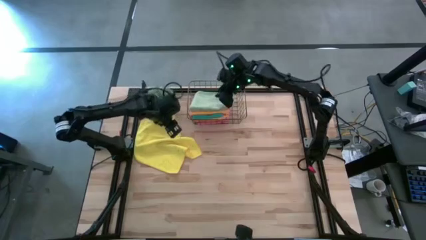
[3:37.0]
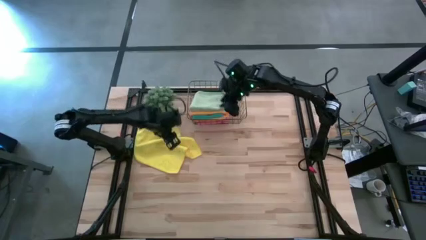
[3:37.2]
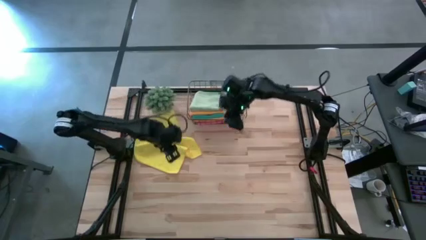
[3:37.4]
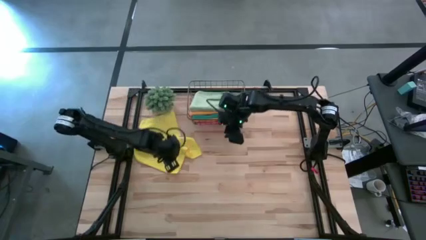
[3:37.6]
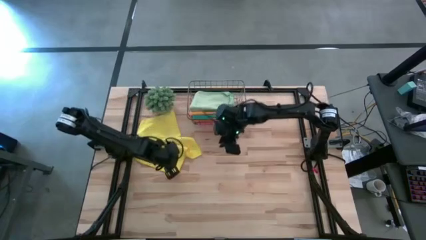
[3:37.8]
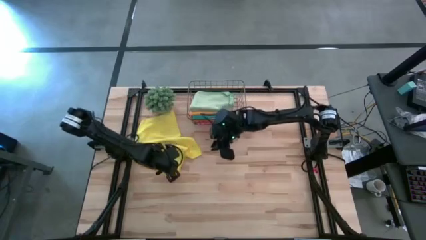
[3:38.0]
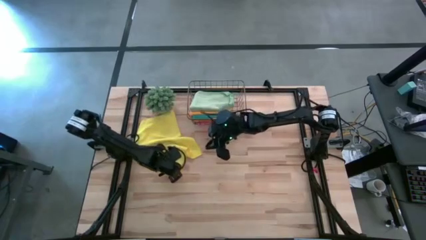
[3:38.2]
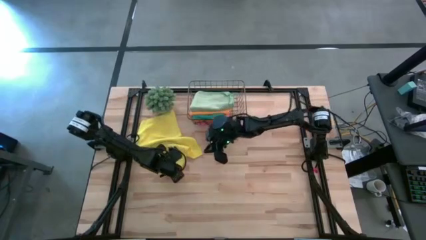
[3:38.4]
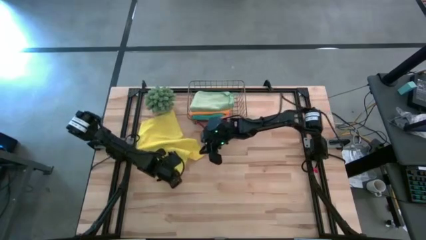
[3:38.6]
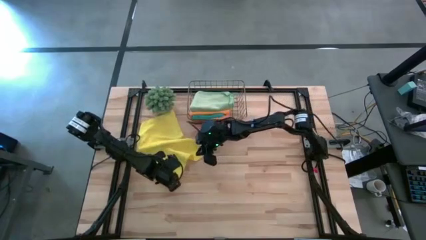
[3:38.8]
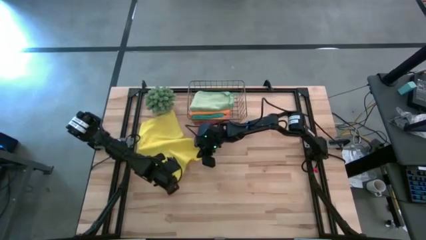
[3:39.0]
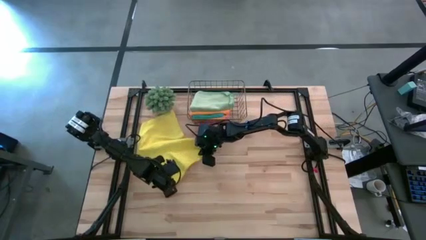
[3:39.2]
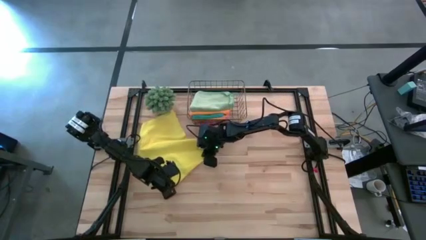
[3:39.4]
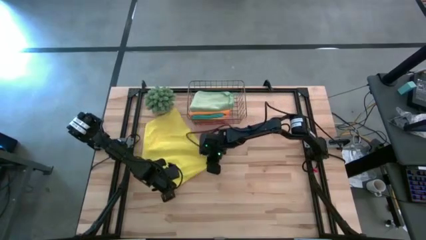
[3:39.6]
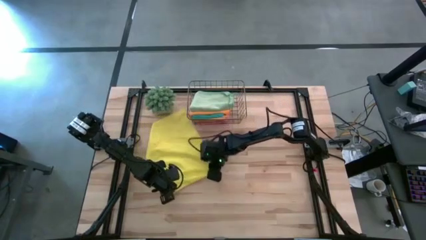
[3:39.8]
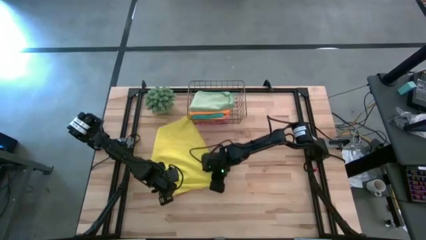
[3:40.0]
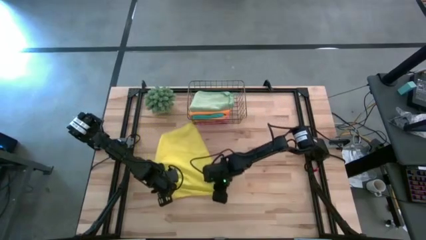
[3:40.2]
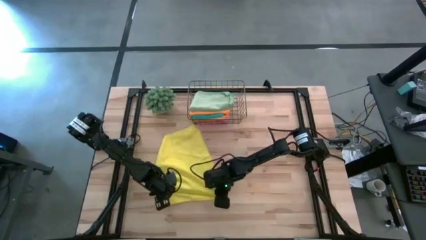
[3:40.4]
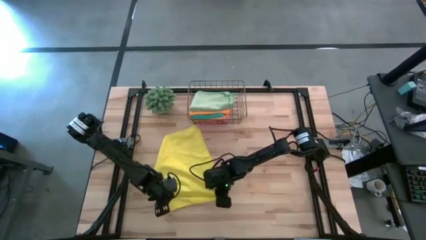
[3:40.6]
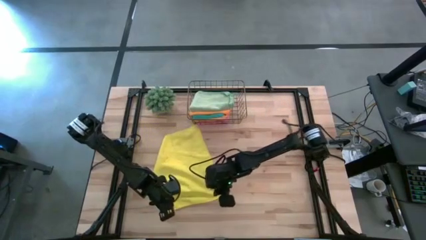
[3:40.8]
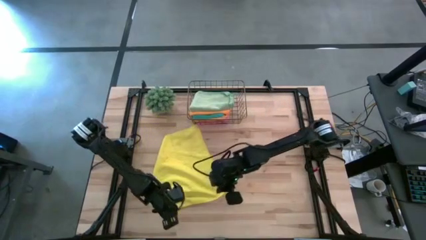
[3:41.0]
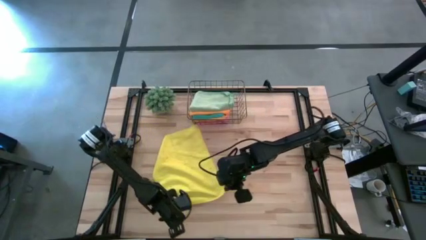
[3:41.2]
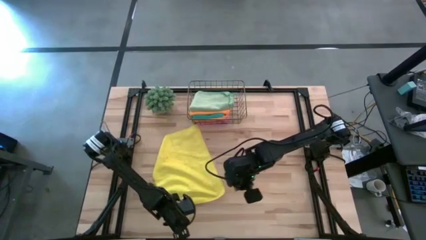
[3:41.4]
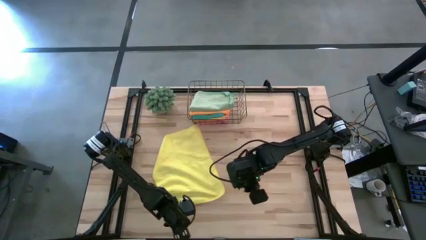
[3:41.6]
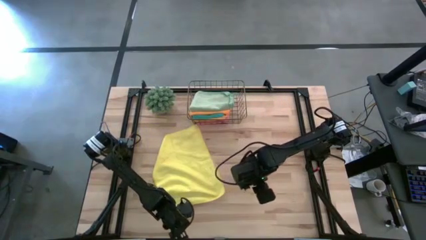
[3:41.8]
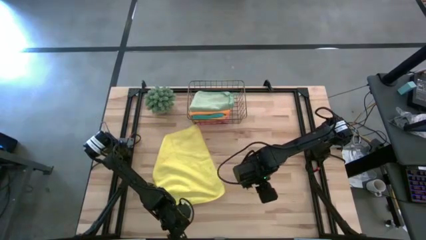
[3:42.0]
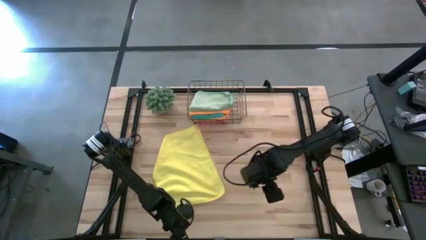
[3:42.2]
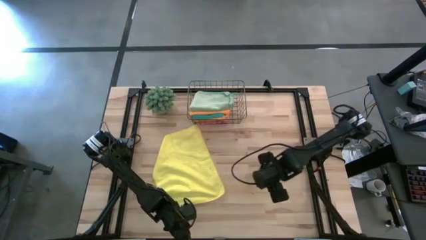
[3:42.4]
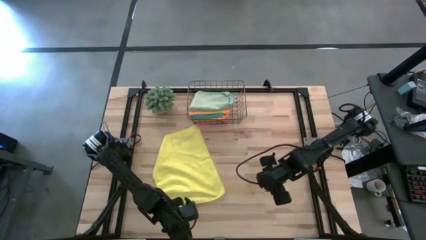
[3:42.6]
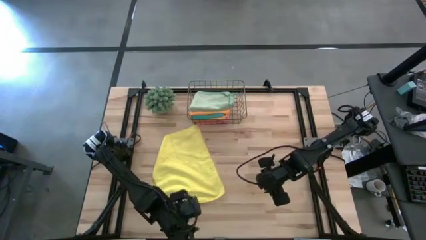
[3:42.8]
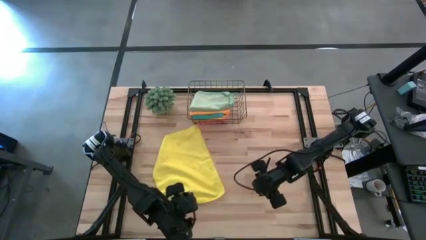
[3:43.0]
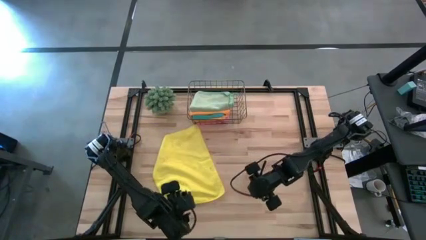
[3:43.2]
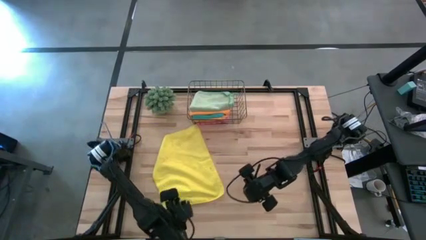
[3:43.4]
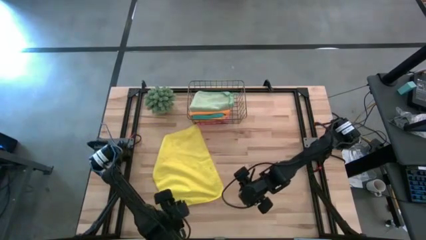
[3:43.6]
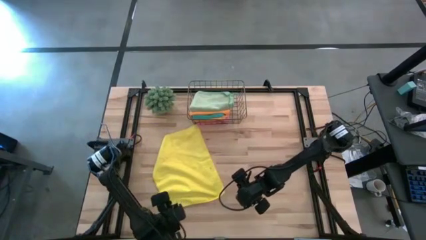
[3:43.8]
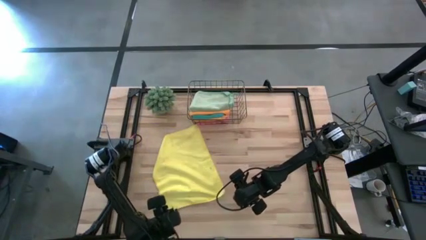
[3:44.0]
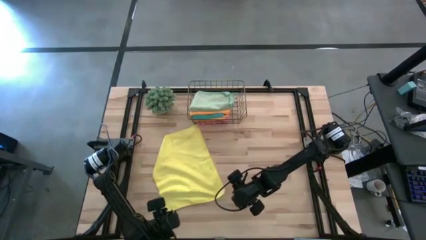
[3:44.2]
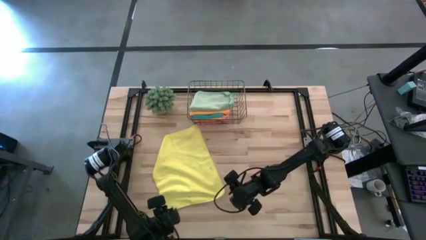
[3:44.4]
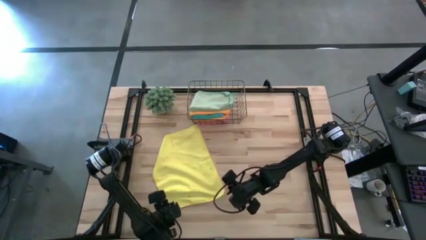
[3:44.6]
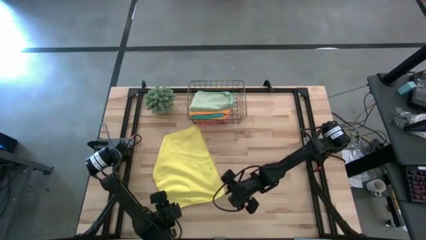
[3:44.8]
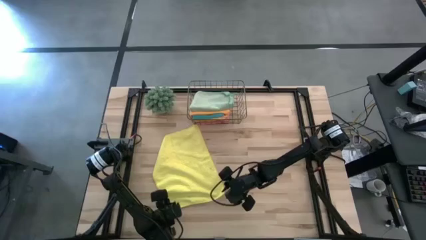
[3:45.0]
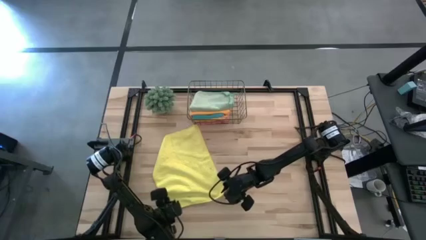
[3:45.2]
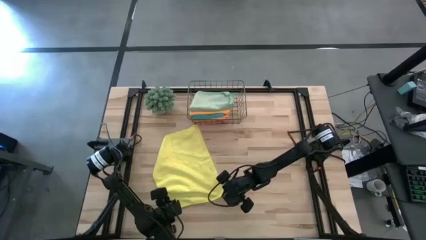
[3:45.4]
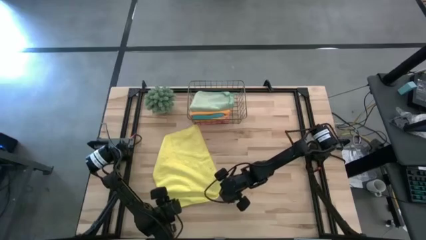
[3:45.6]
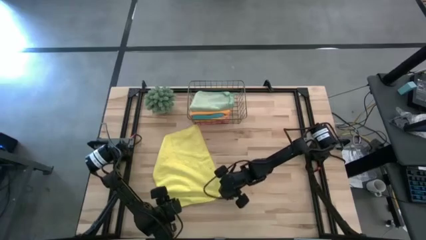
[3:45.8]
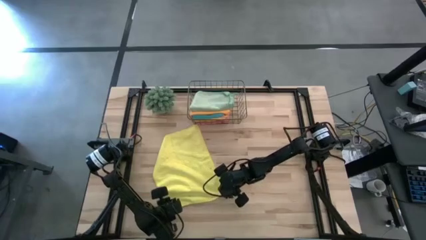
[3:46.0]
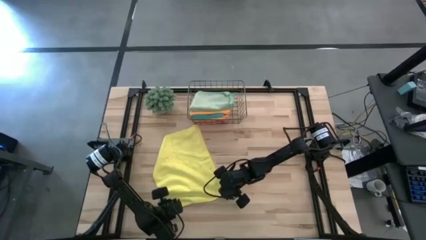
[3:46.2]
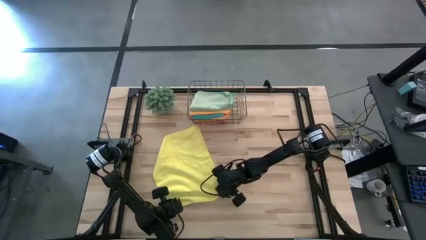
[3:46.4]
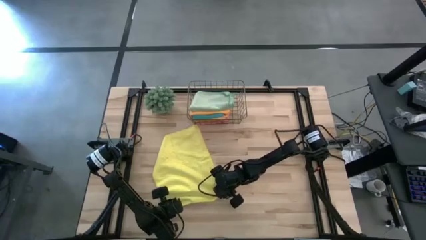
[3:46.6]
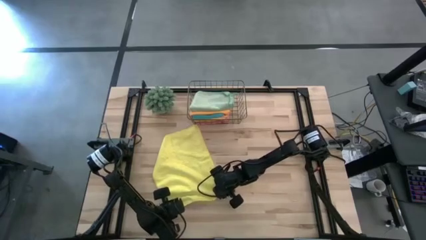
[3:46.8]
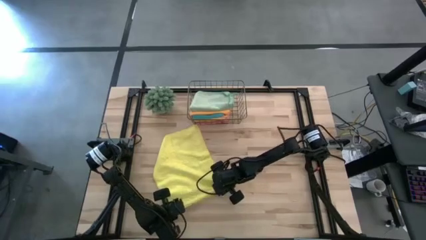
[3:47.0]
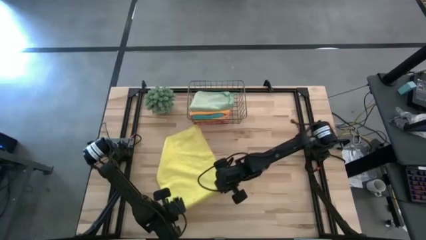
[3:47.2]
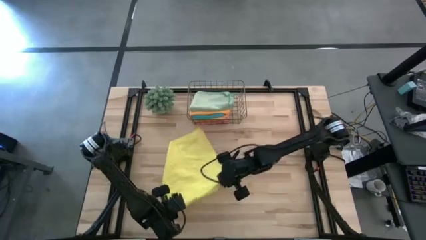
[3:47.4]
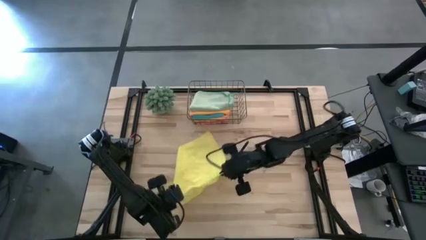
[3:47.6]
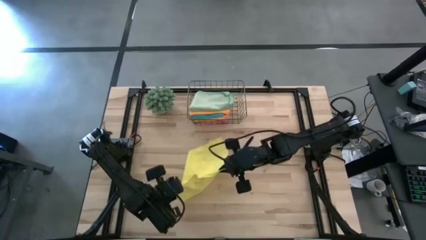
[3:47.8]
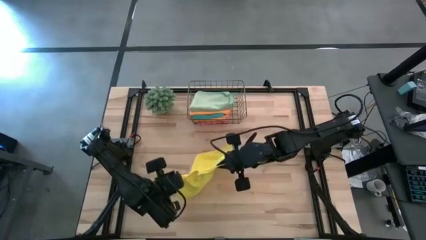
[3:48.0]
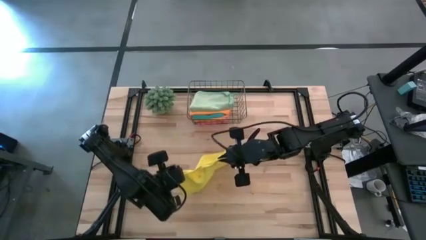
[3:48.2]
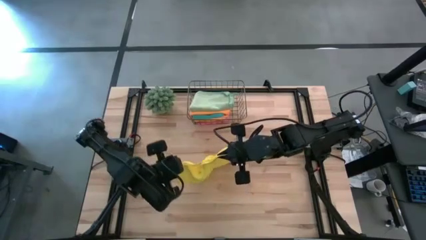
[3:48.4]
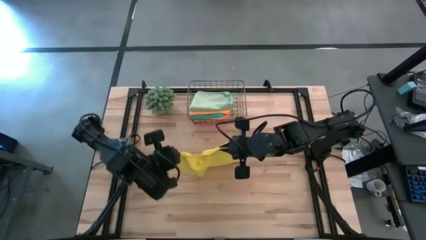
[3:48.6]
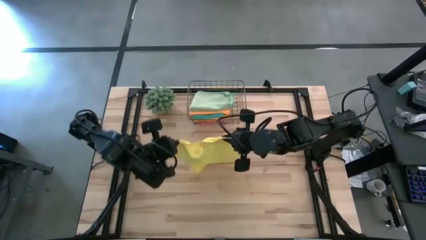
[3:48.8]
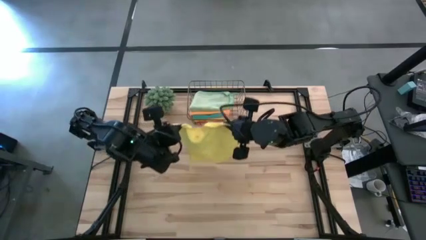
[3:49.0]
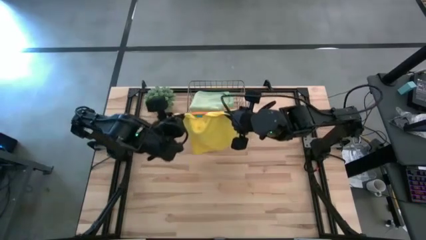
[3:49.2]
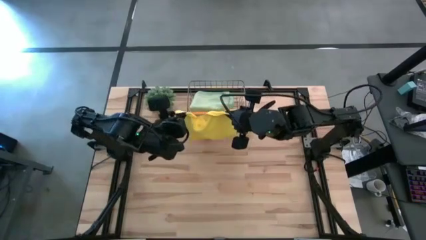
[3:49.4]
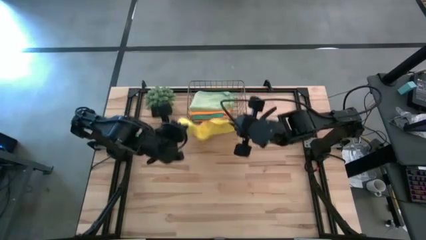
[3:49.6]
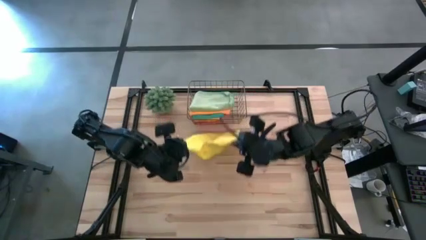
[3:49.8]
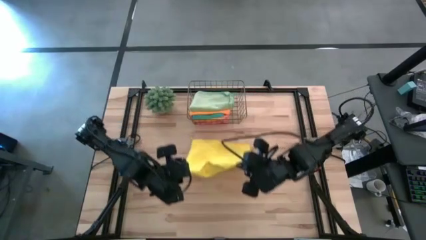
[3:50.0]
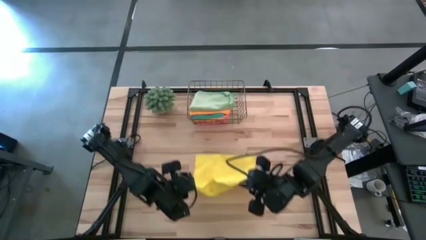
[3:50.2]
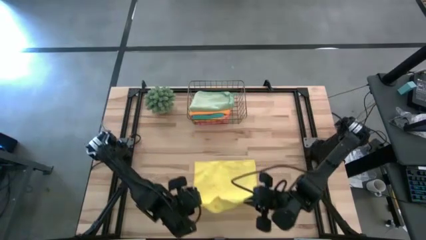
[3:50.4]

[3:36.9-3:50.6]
Task: Fold microfiber towels
Fold the yellow microfiber towel
